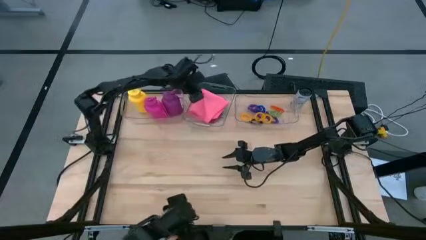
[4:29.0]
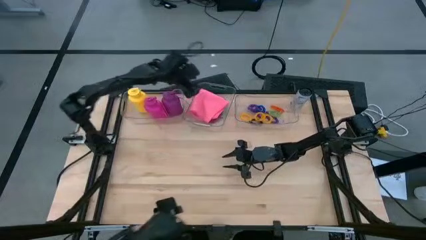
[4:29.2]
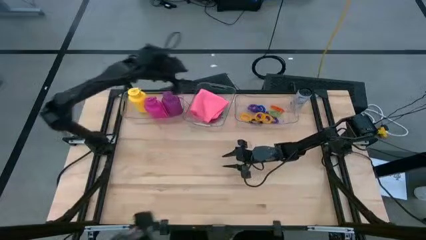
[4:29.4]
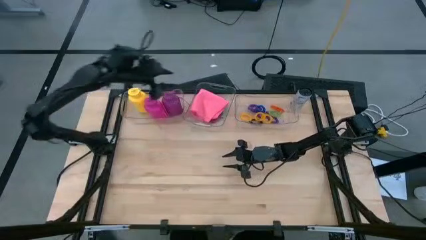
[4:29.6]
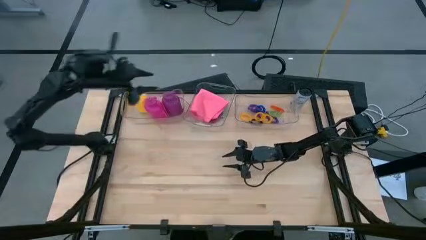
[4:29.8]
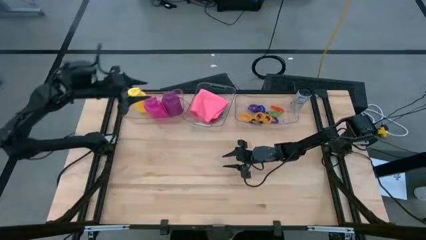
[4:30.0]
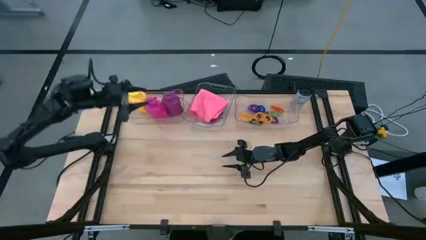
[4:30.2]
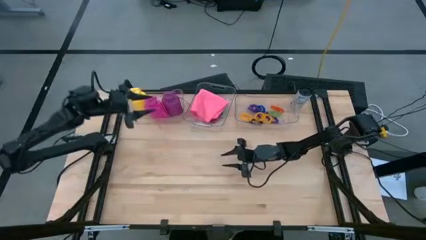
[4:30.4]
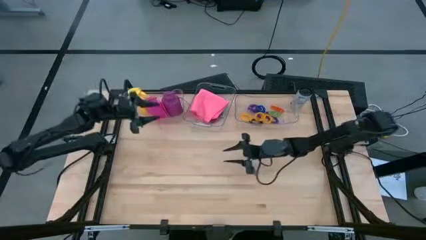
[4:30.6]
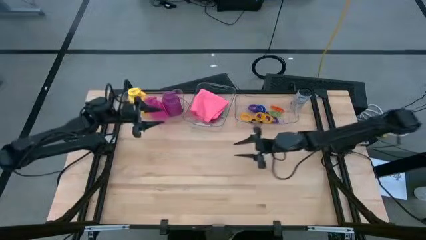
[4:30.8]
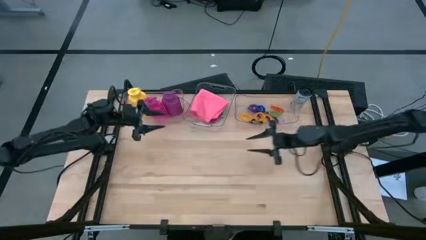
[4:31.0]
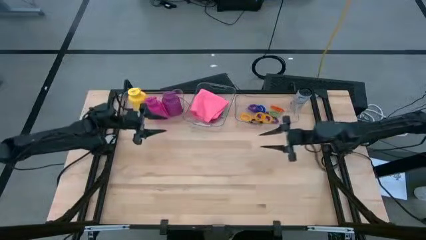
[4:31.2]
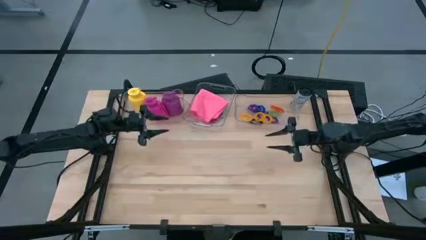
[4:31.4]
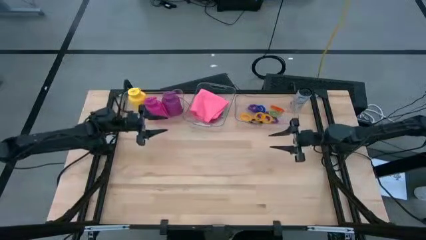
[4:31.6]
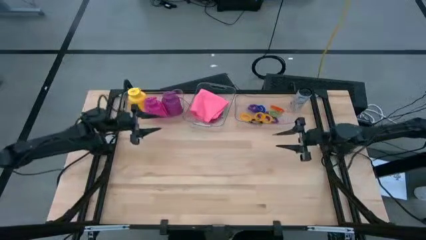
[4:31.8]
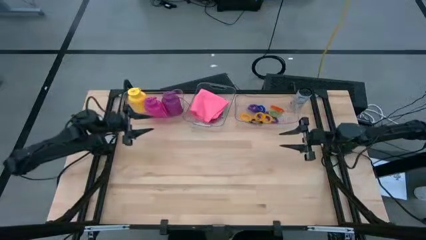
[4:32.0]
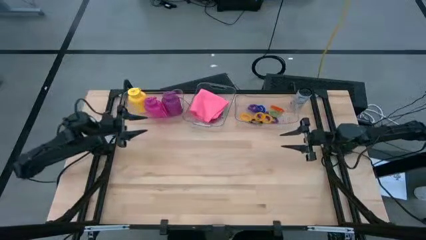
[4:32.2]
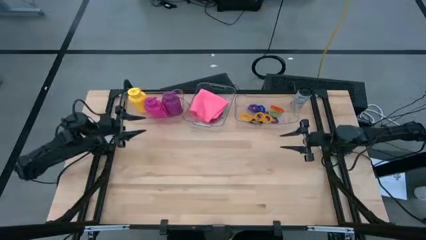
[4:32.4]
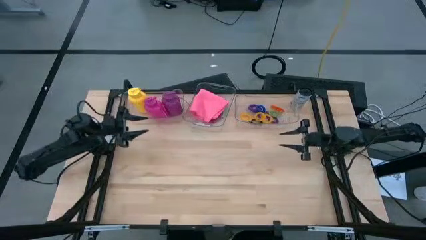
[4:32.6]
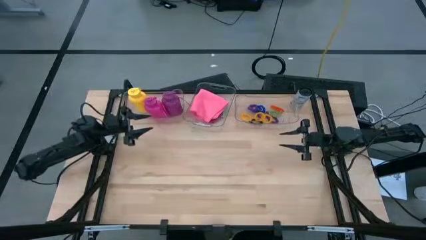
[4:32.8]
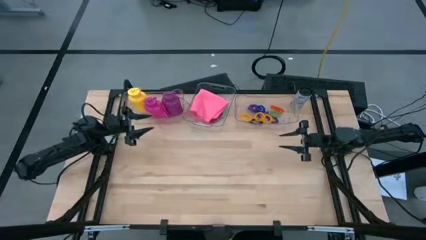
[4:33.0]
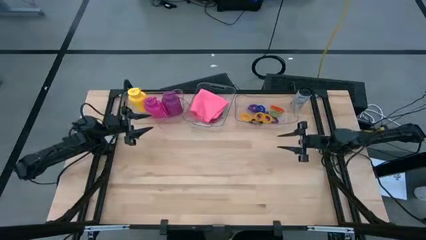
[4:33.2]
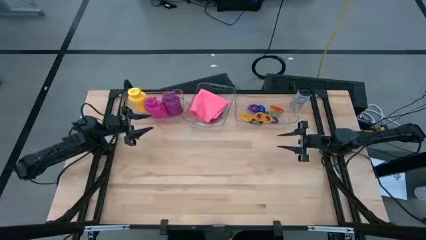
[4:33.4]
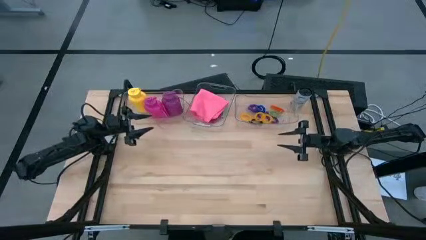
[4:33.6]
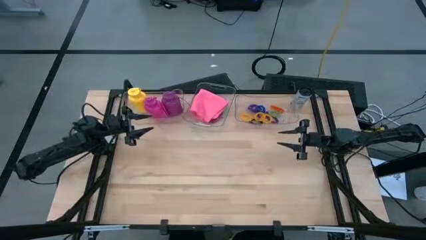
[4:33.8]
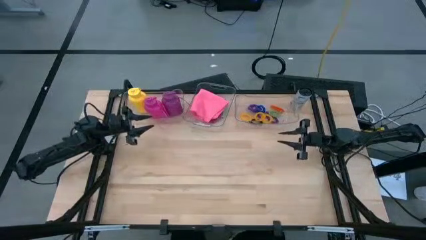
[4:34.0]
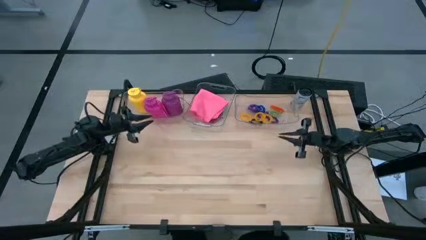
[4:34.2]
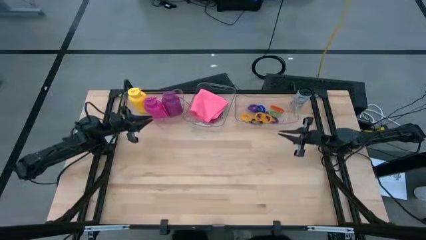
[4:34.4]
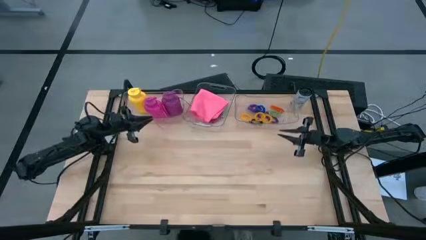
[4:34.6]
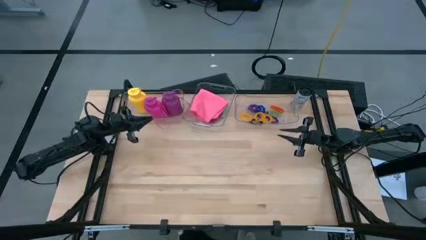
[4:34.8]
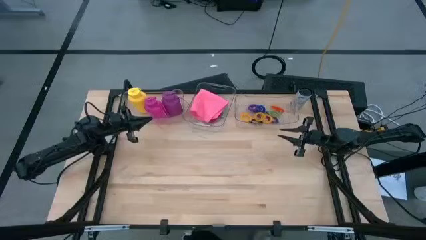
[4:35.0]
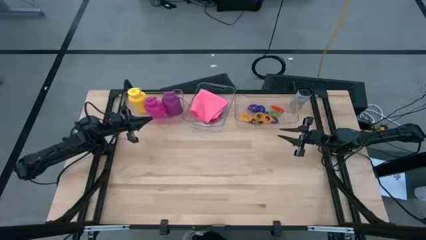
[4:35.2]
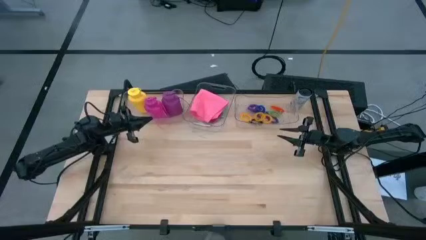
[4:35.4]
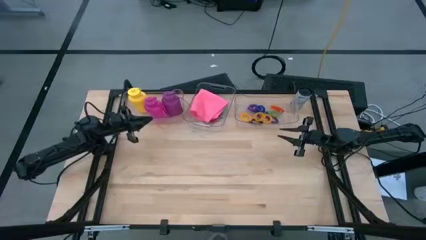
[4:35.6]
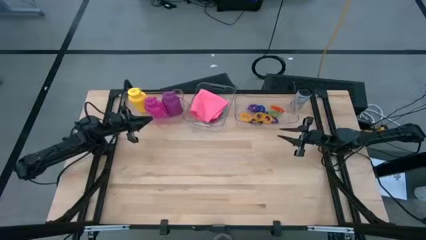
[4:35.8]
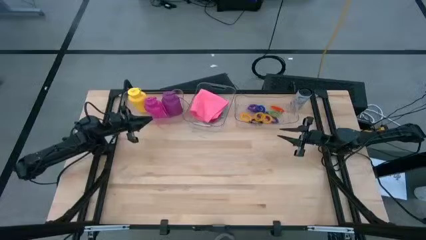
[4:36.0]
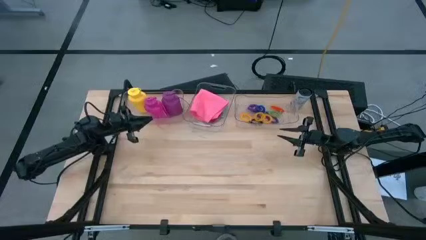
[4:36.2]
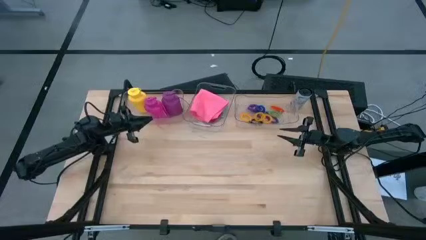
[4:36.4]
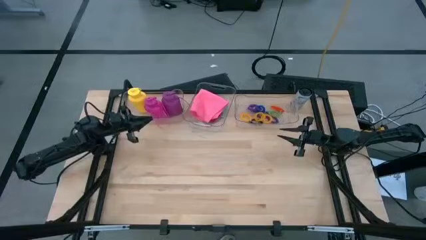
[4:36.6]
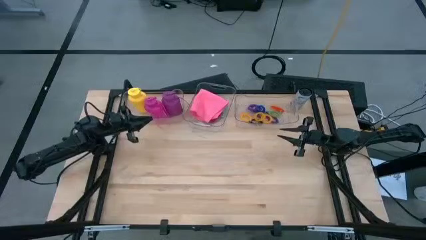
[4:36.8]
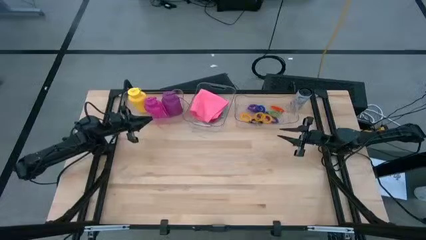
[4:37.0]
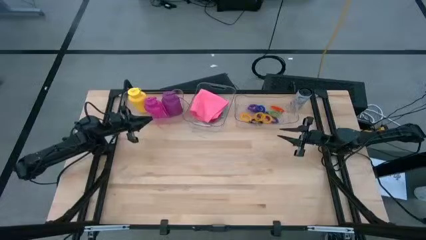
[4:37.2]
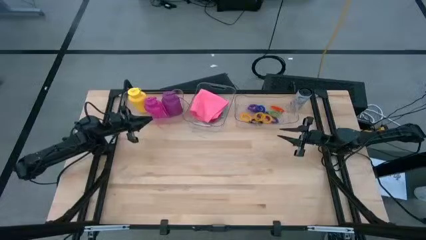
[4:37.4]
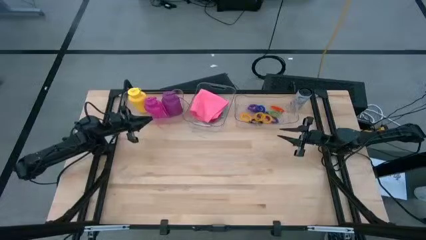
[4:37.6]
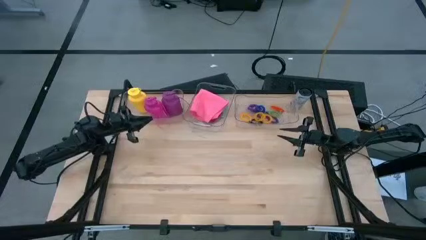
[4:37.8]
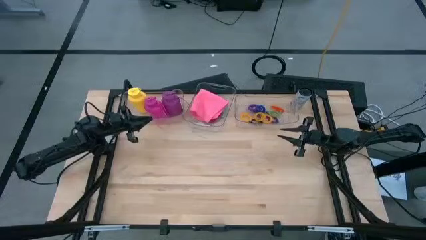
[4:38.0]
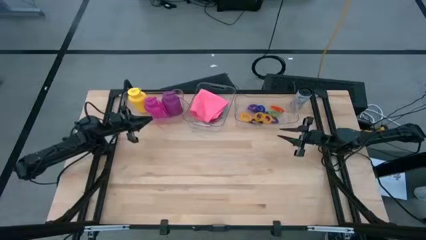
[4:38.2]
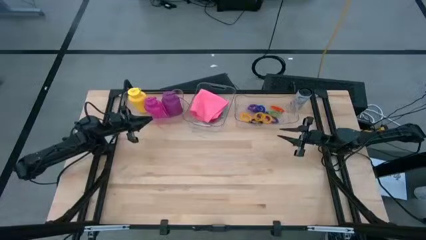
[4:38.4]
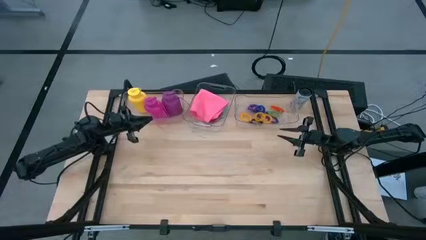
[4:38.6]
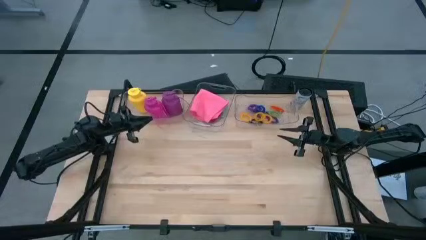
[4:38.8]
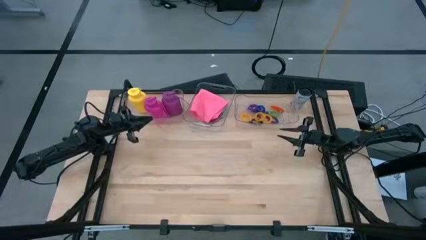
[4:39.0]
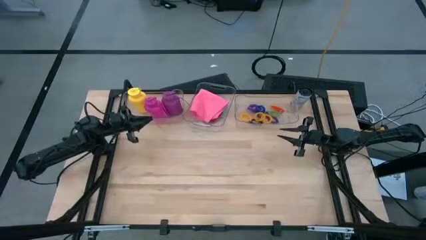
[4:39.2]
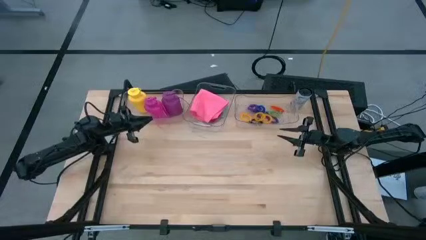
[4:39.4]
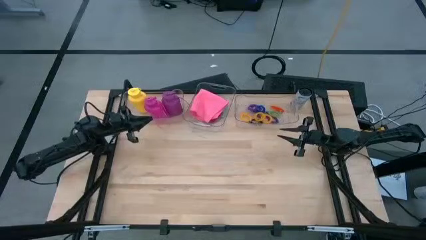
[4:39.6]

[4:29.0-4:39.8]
Task: Pick & Place Sports Items
Return to Home Position

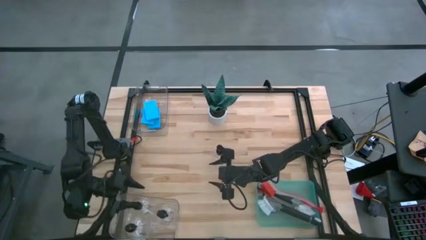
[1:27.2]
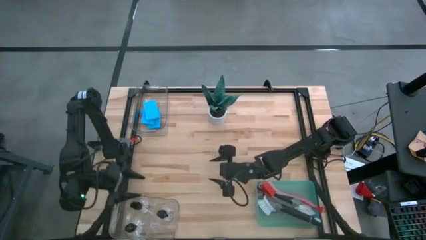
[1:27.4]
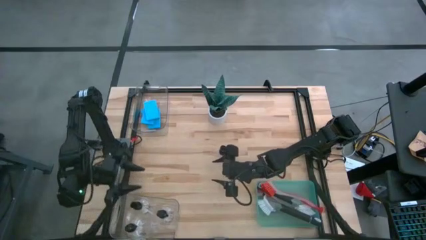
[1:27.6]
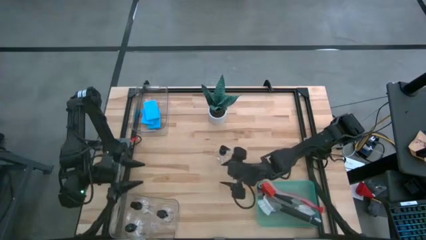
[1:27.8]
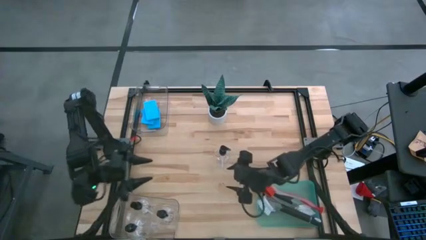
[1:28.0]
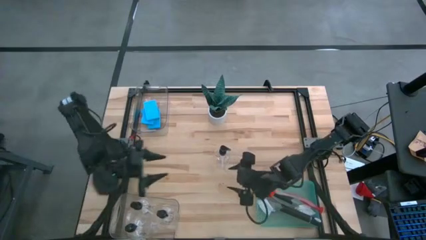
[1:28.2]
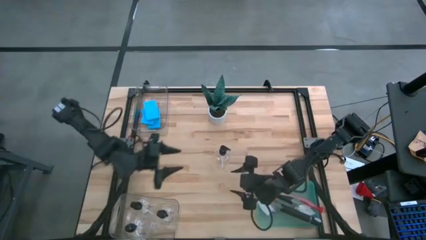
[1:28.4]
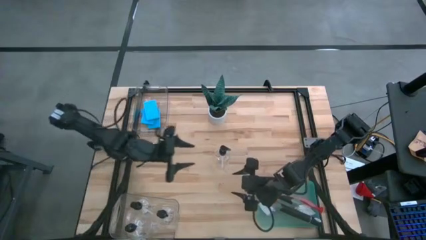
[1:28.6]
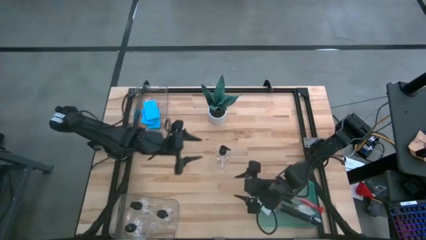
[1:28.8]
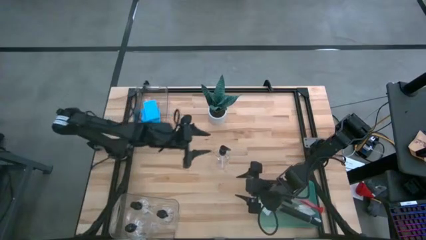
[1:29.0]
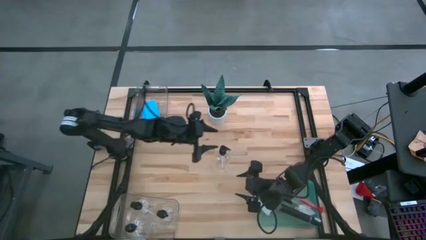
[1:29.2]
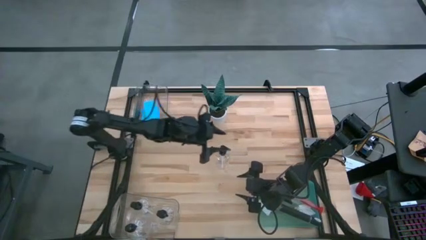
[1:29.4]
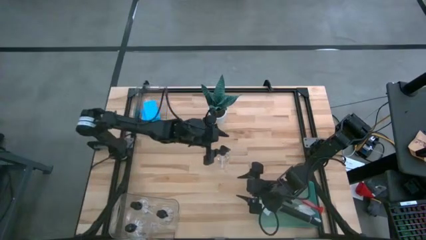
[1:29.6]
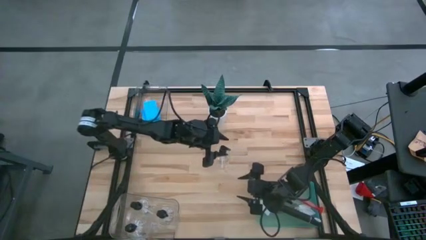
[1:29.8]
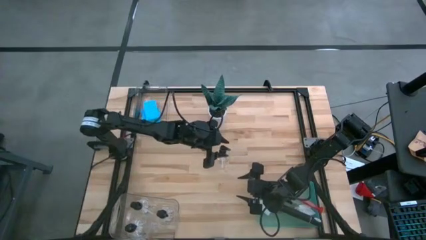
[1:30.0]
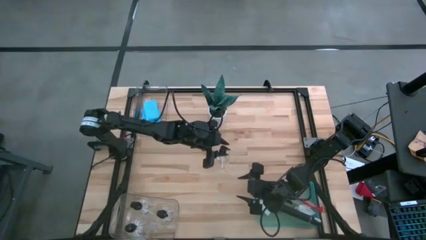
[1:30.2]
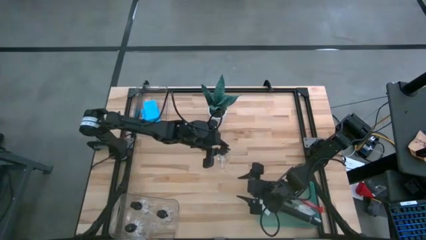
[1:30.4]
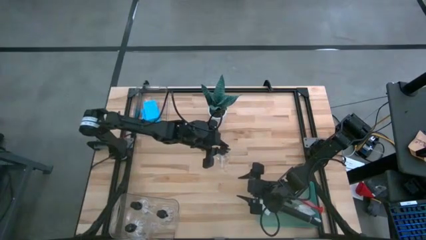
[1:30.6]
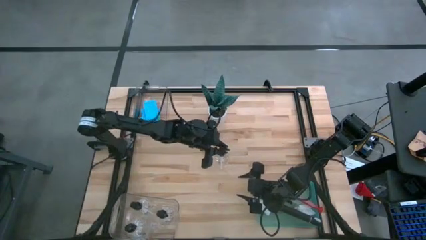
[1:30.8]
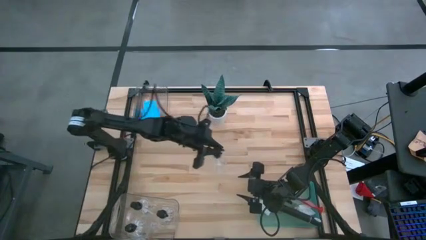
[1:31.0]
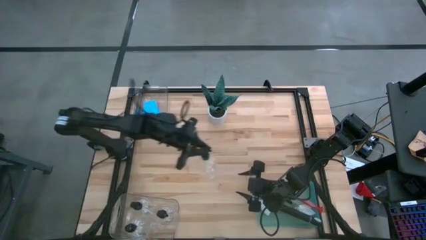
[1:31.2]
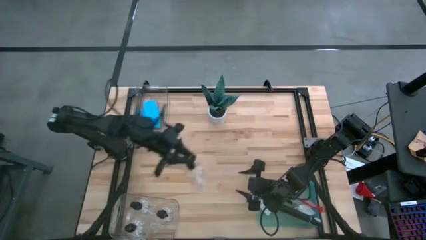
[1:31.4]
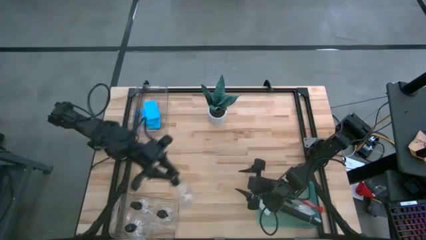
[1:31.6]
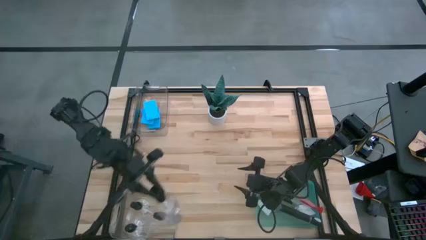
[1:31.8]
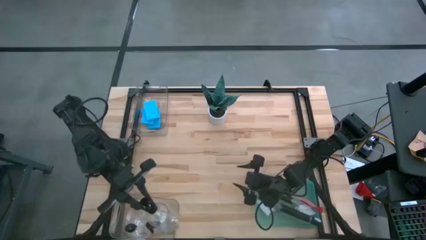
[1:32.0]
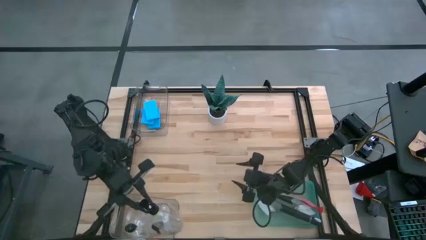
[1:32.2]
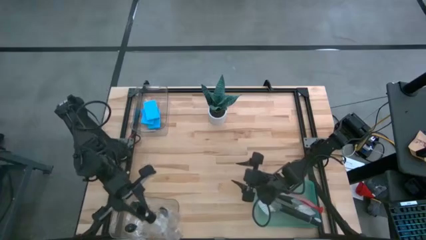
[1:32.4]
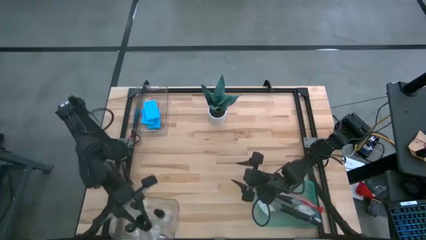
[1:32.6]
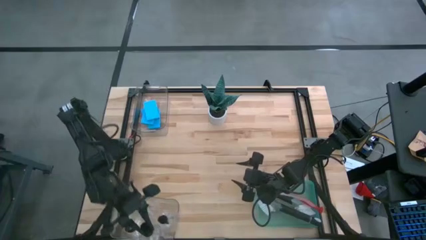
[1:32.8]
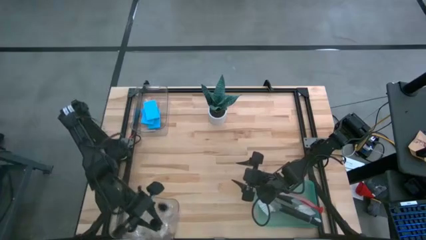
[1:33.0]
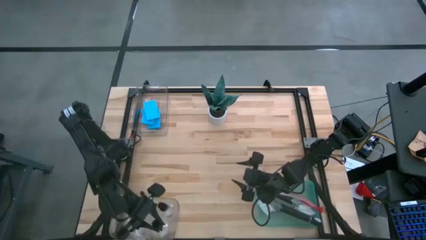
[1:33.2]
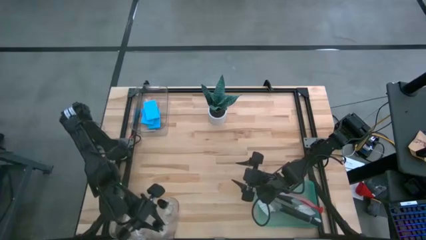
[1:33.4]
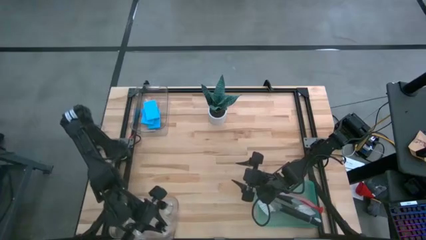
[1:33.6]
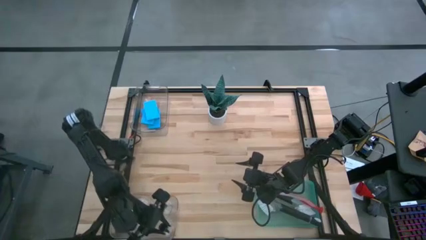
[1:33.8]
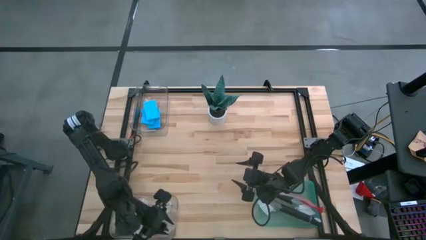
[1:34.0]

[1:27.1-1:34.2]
Task: Pick & Place Kitchen Sink Supplies
Put the transparent spray bottle into the bottom transparent bin
